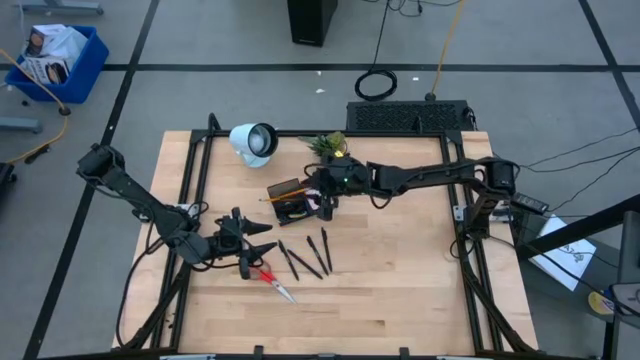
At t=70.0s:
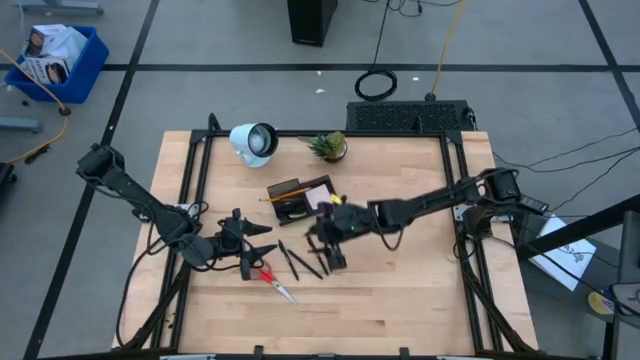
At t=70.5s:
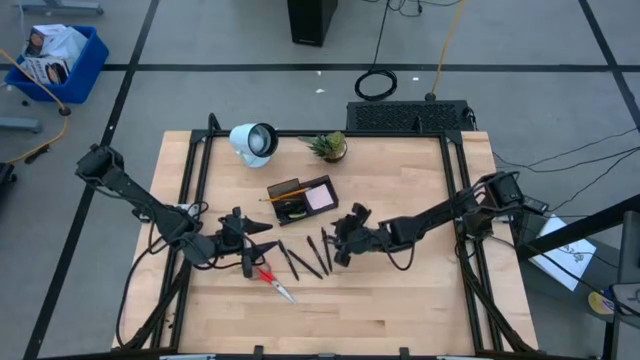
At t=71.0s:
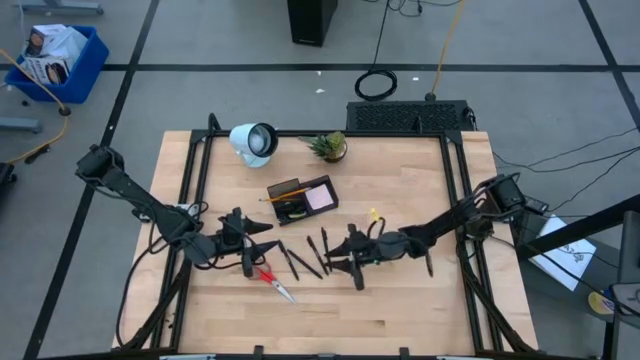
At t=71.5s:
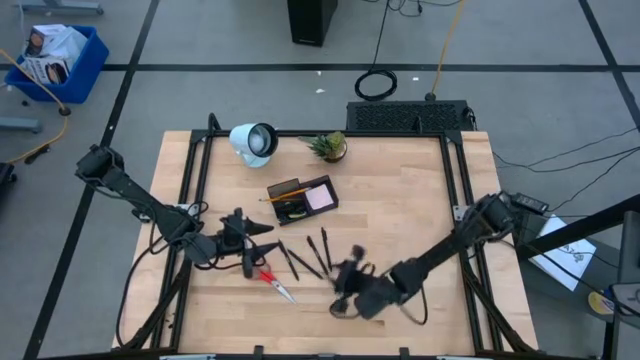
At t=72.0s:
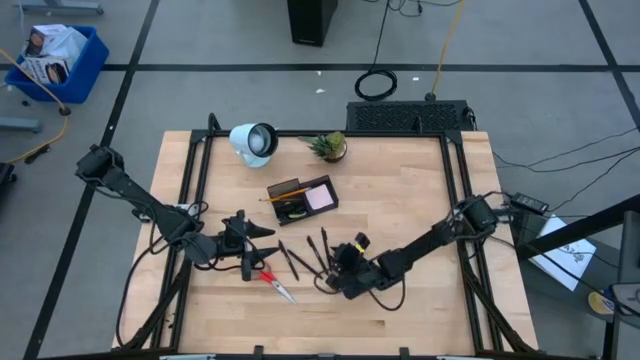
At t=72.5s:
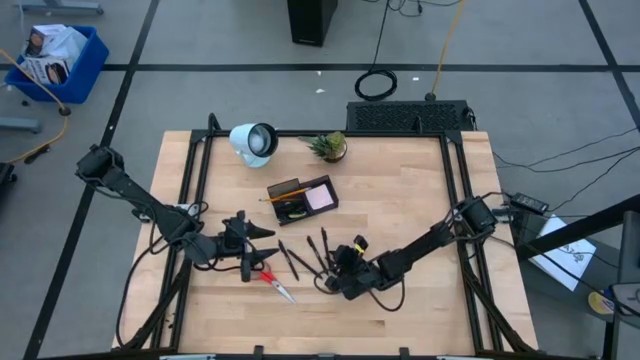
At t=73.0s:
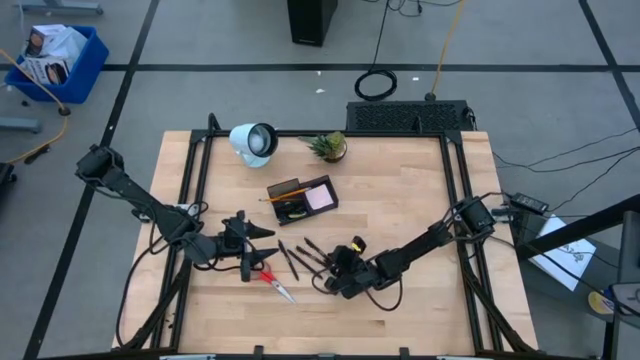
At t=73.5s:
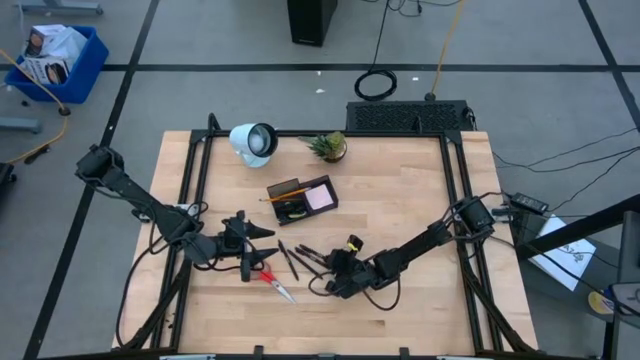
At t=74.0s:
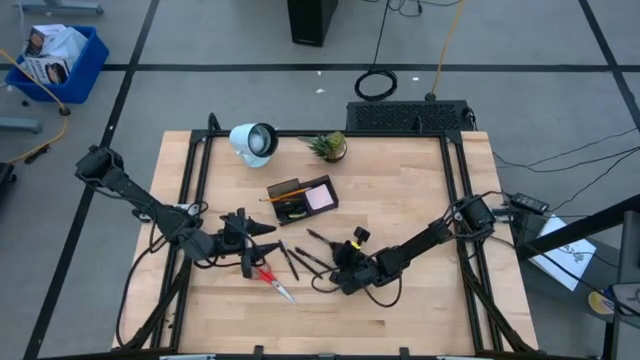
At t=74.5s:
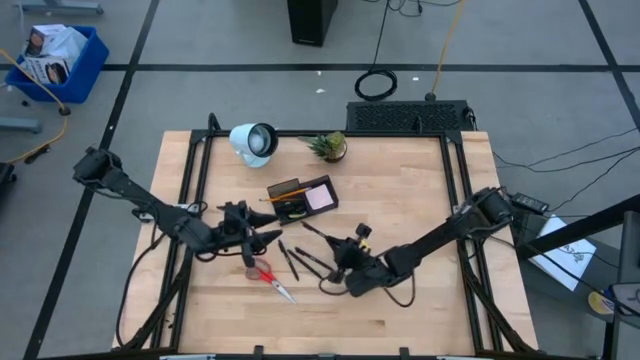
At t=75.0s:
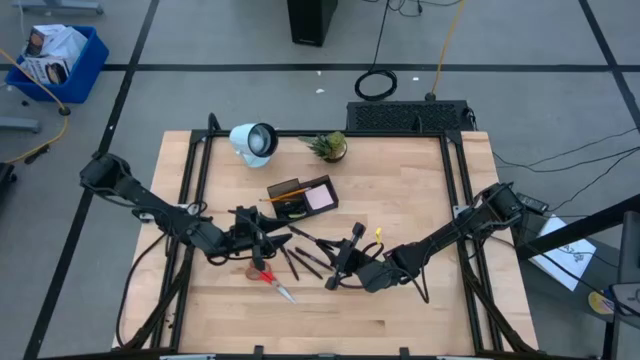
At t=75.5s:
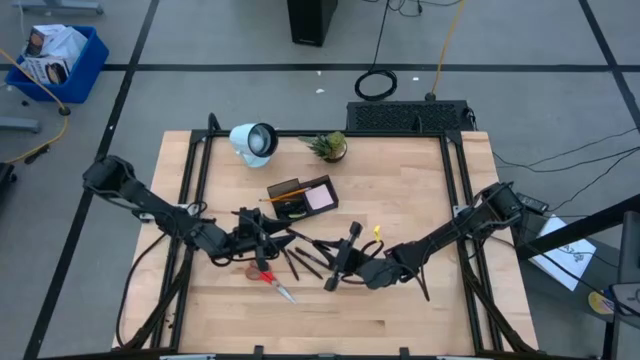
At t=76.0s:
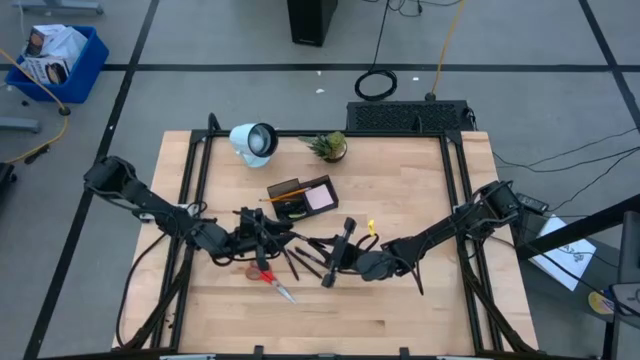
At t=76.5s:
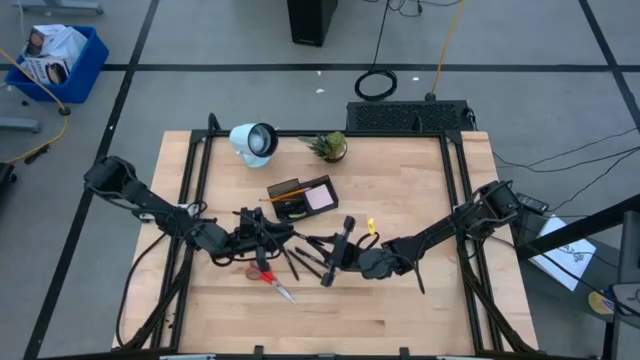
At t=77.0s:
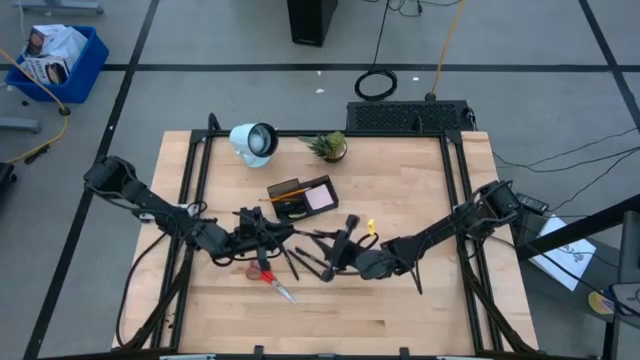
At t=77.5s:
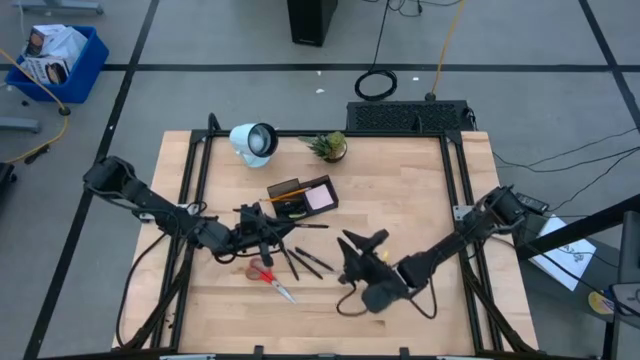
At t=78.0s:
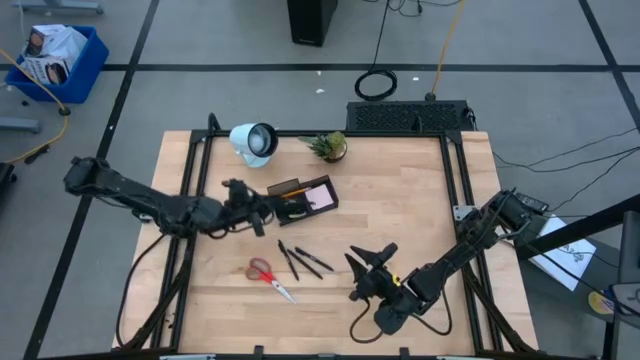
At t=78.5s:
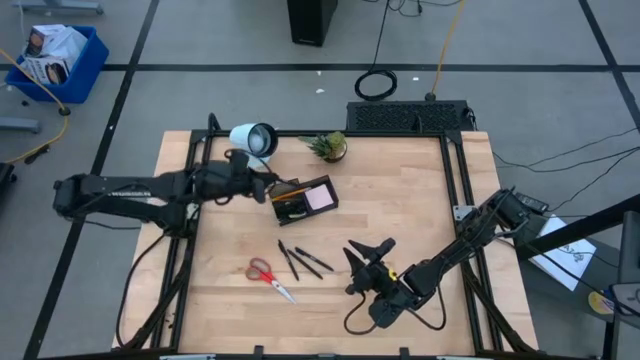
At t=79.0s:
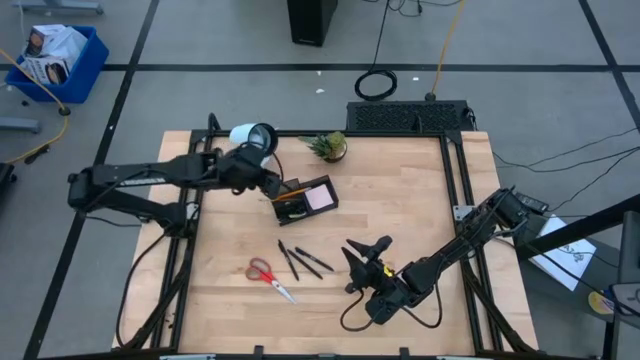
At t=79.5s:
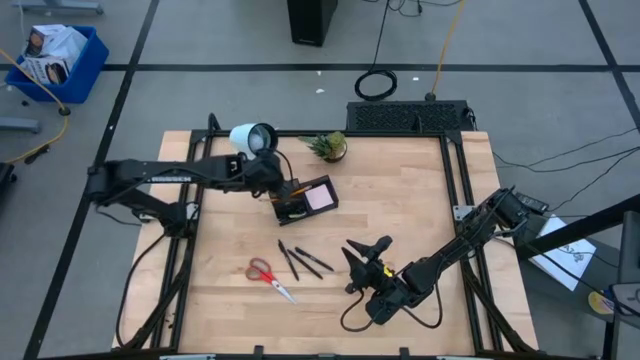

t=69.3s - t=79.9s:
Task: Pick and place office supplies into organizer
Put the black pen into the black desk organizer

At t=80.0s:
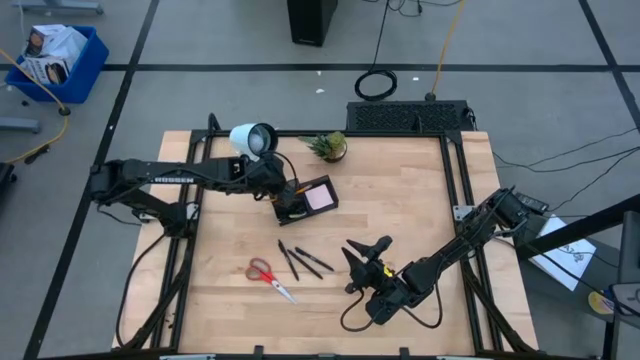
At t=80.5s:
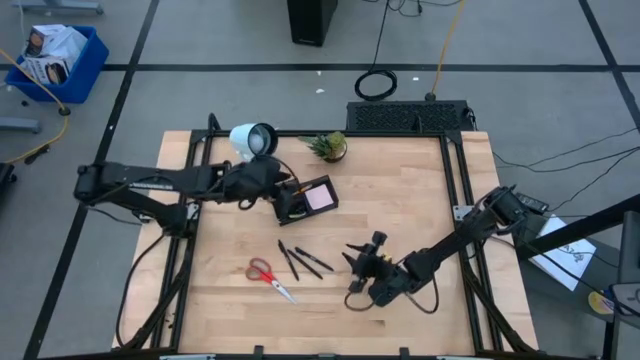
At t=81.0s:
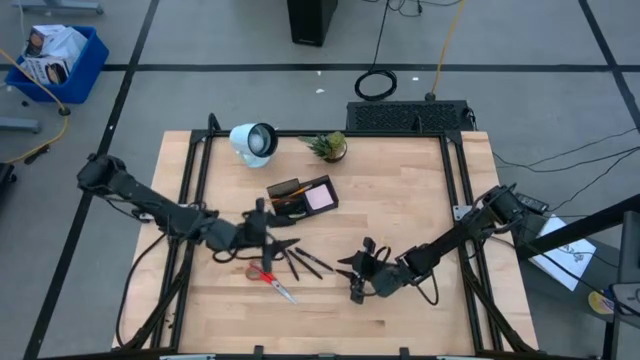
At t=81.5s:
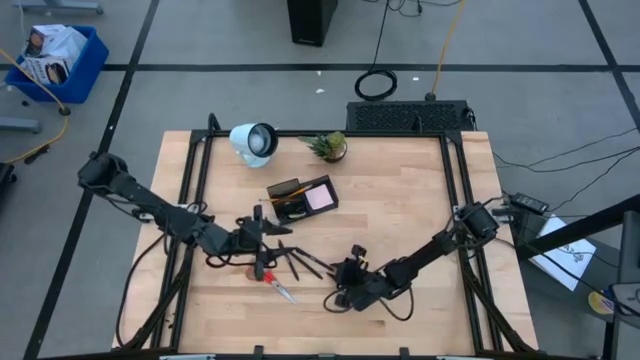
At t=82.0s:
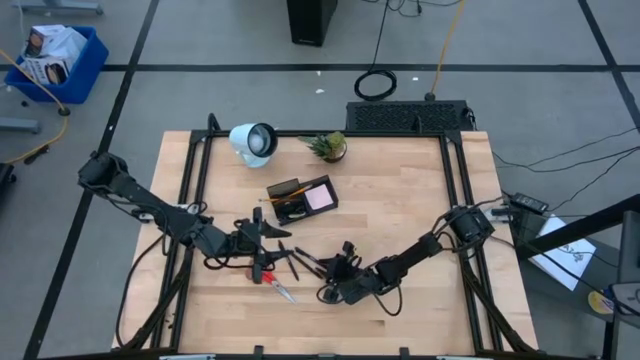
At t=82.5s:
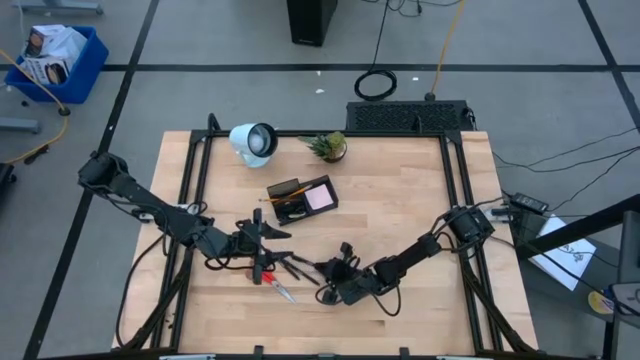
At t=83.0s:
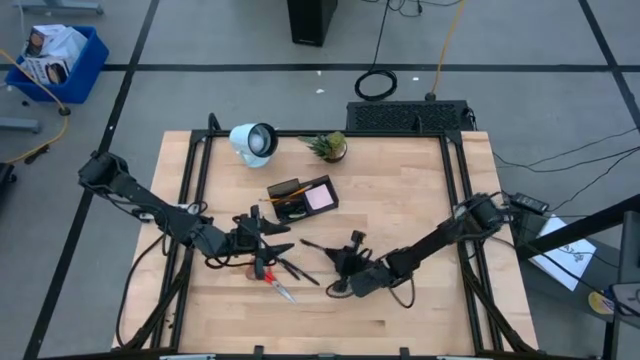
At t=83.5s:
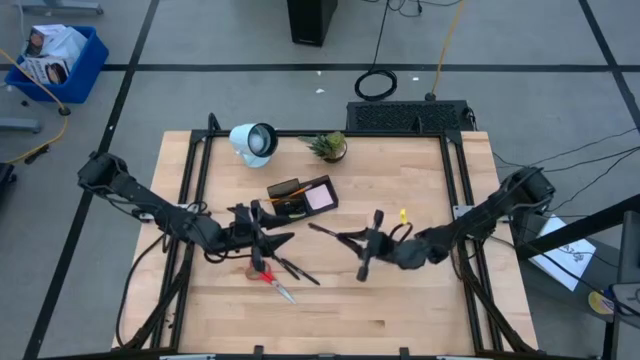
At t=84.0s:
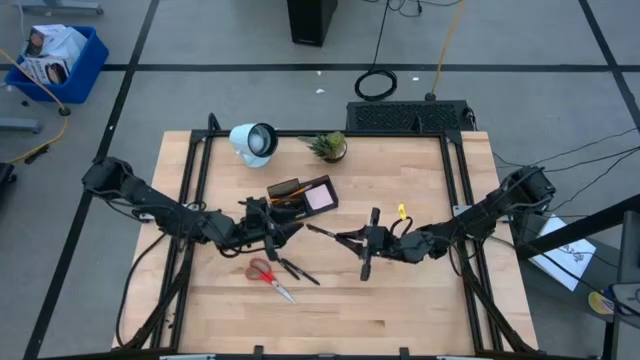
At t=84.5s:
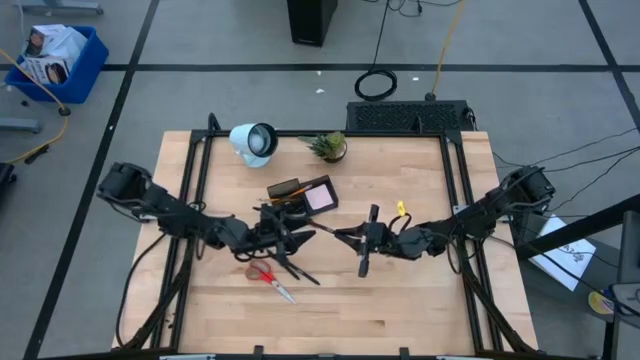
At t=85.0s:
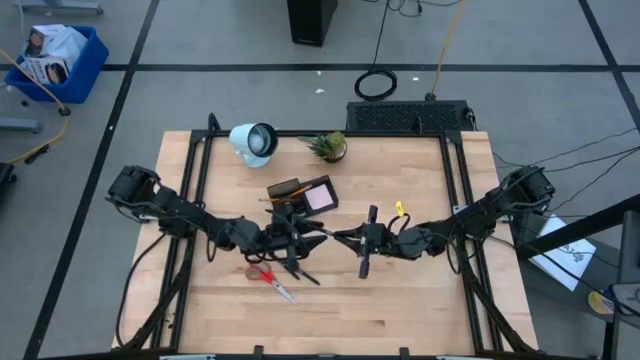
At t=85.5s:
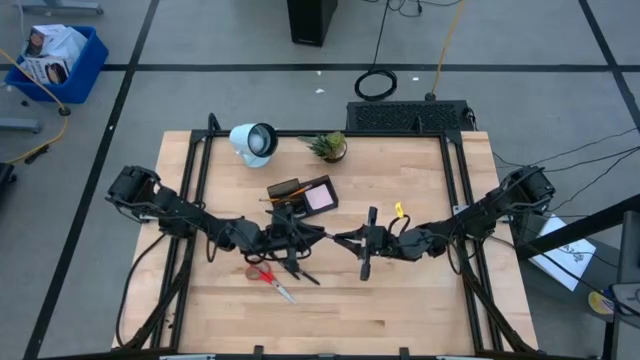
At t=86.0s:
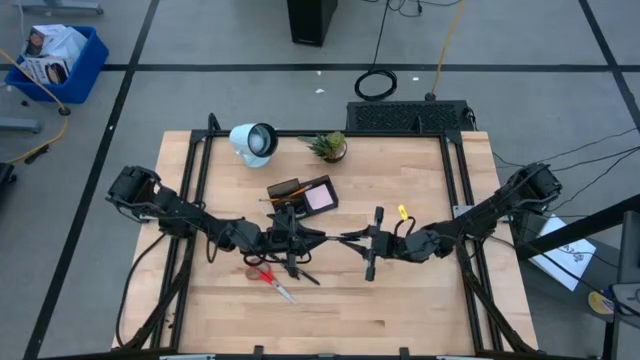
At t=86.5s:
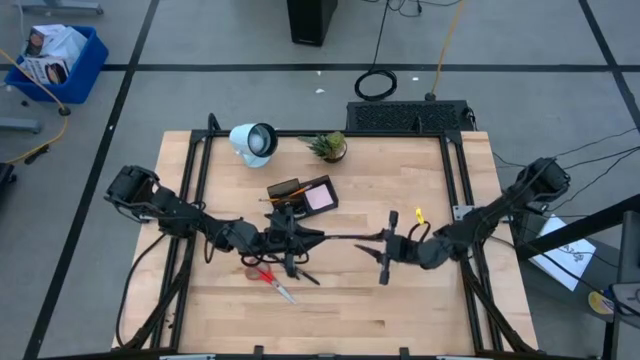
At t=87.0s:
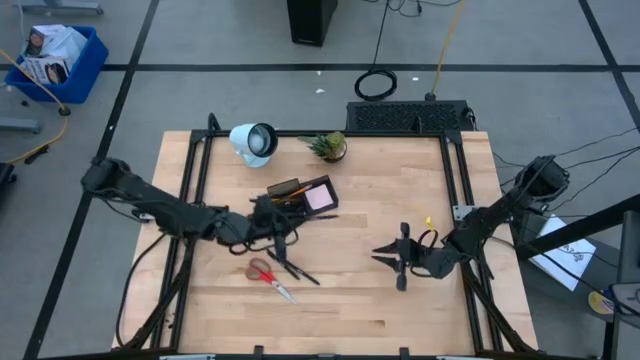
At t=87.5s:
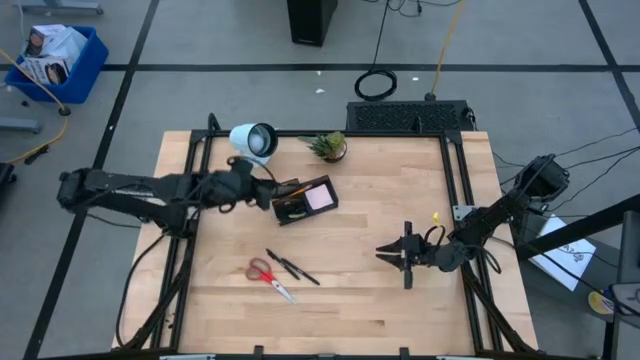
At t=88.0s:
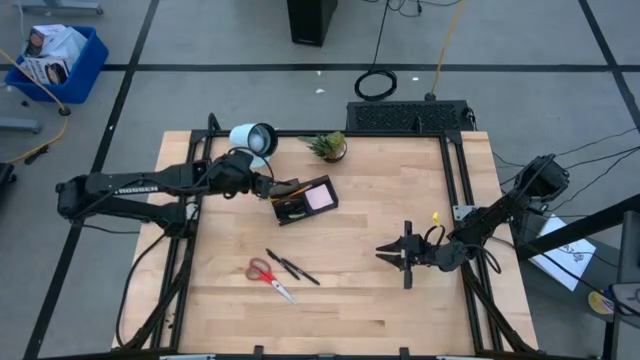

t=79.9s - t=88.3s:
Put the black pen into the black desk organizer

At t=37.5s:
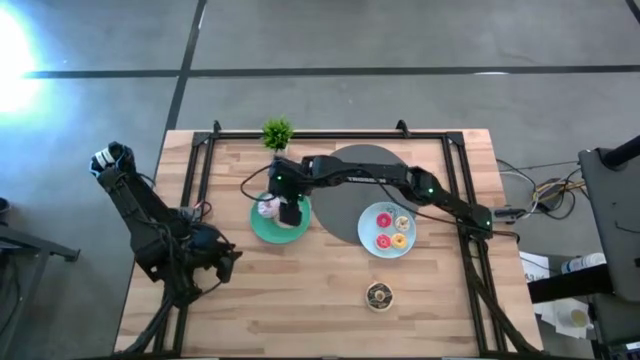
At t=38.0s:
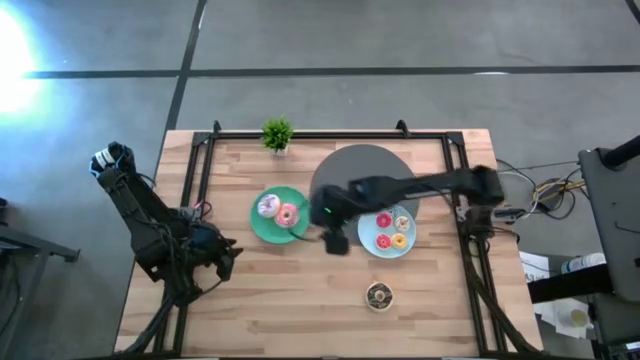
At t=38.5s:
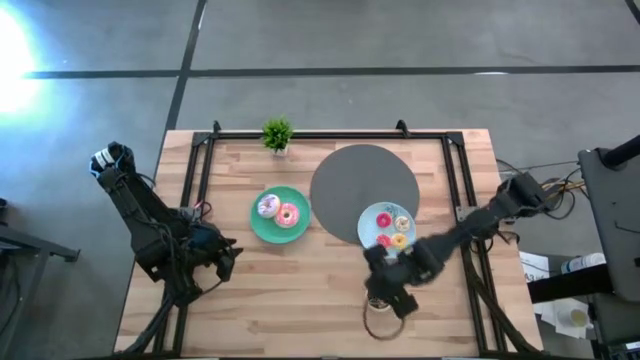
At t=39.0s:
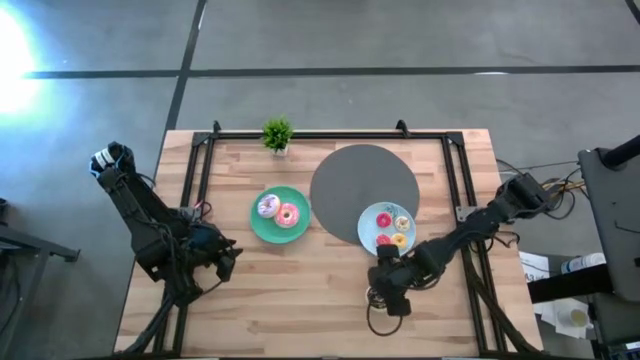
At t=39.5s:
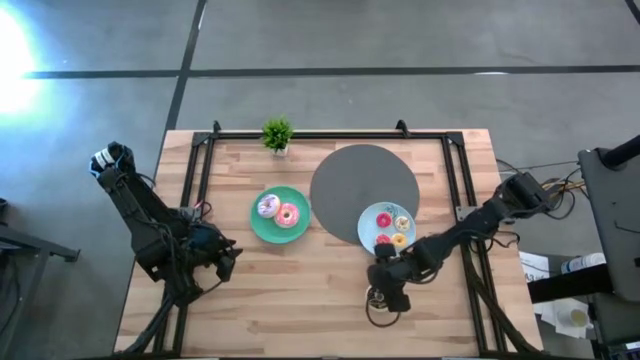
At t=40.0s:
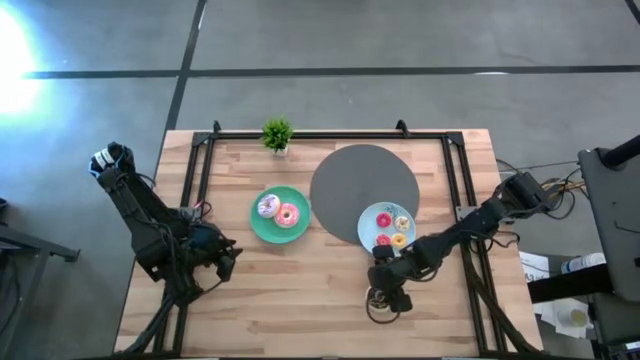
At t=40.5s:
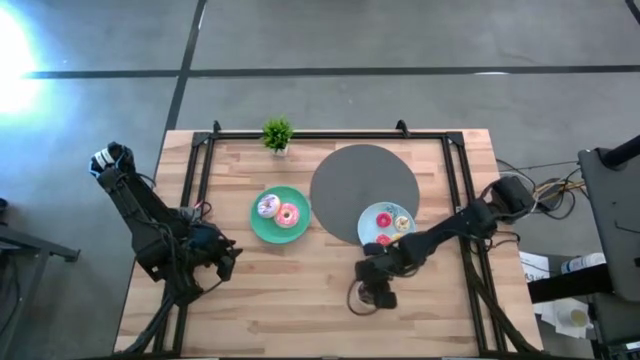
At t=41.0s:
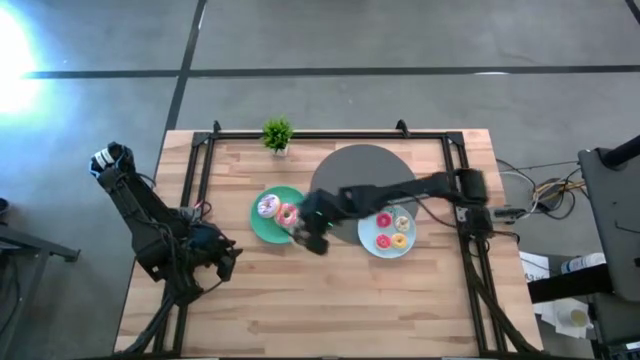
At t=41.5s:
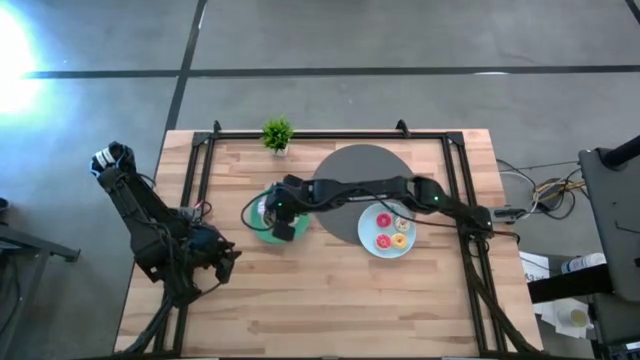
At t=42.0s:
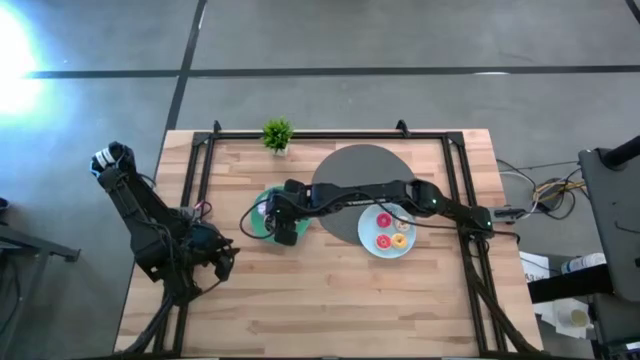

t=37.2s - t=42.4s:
Task: Pick & Place donuts
Put the large black donut on the green plate
